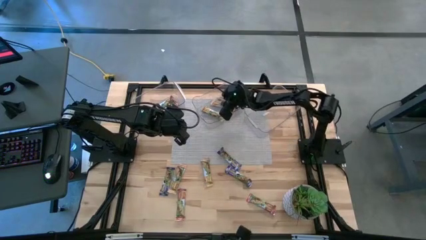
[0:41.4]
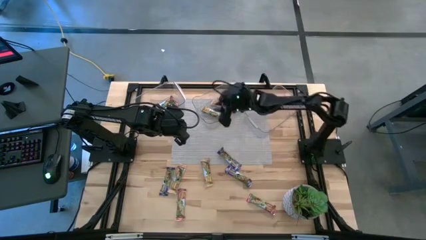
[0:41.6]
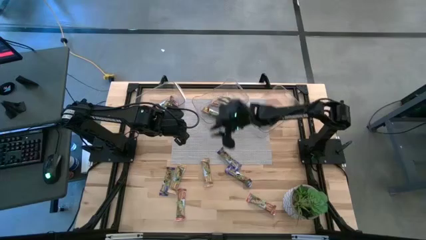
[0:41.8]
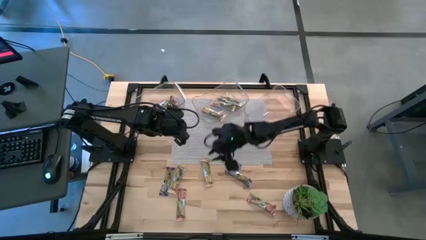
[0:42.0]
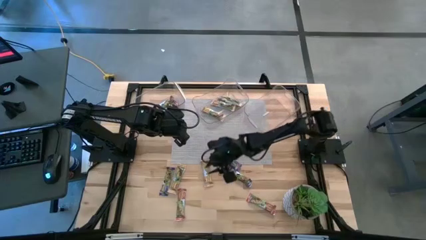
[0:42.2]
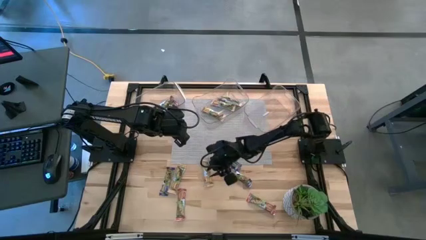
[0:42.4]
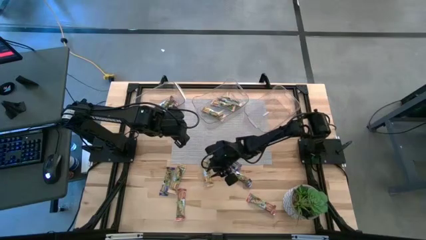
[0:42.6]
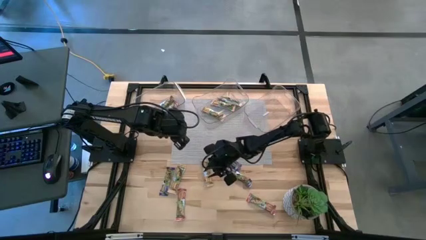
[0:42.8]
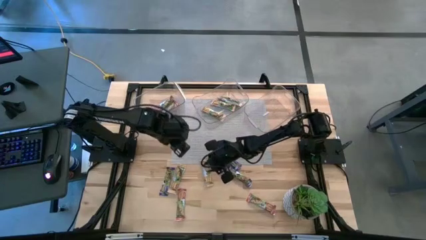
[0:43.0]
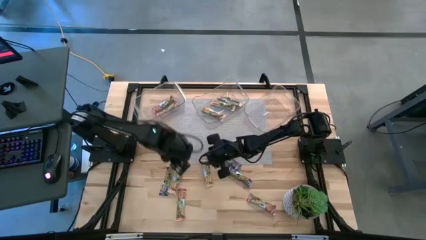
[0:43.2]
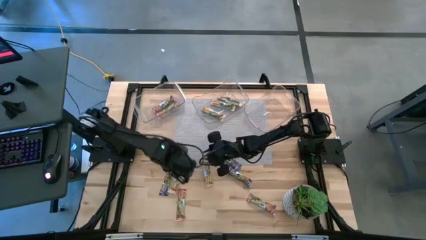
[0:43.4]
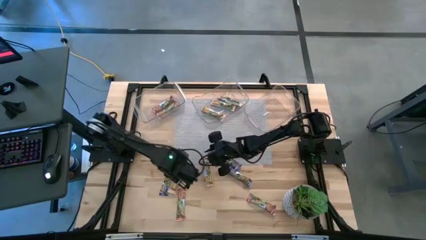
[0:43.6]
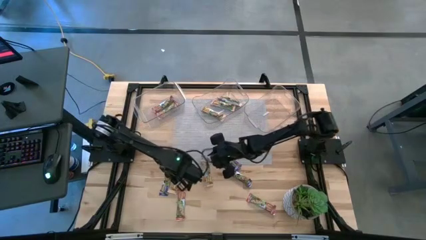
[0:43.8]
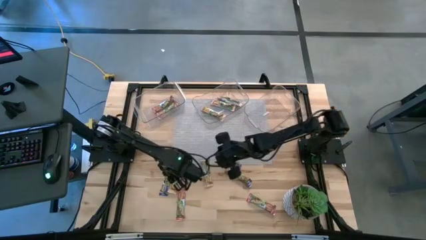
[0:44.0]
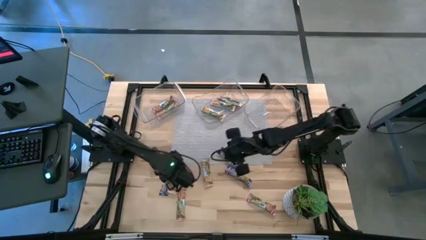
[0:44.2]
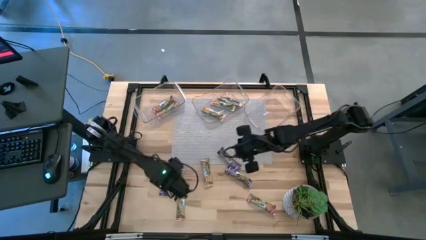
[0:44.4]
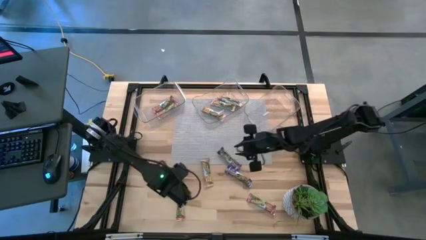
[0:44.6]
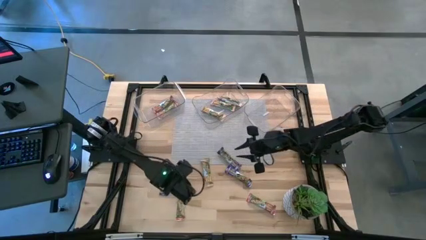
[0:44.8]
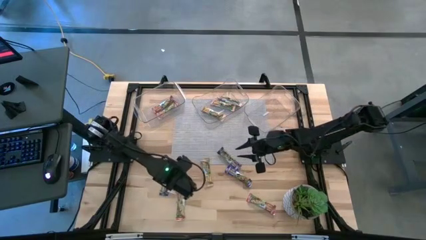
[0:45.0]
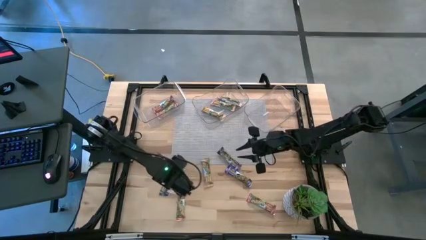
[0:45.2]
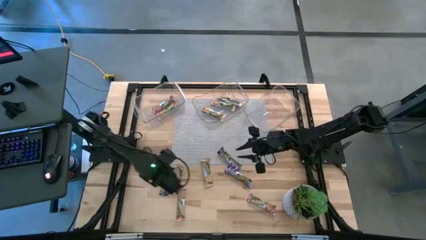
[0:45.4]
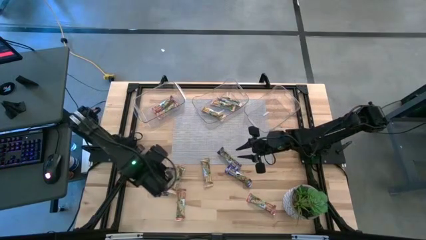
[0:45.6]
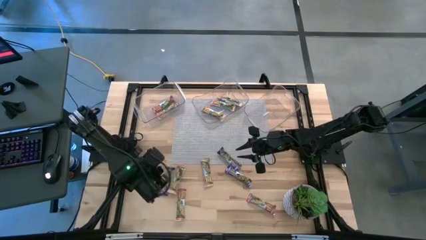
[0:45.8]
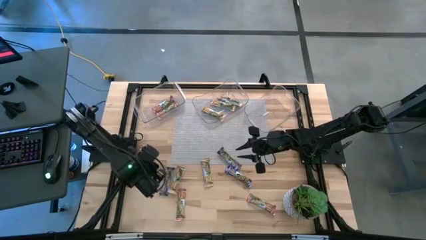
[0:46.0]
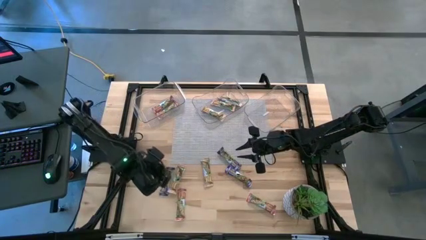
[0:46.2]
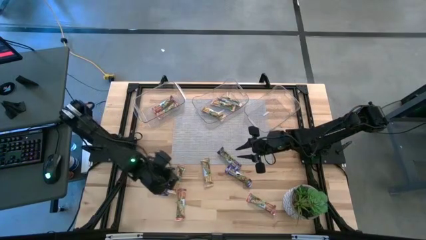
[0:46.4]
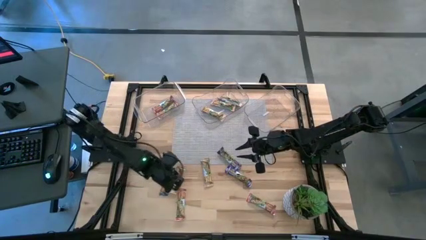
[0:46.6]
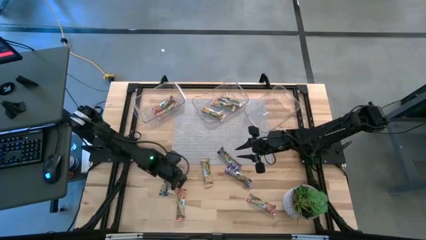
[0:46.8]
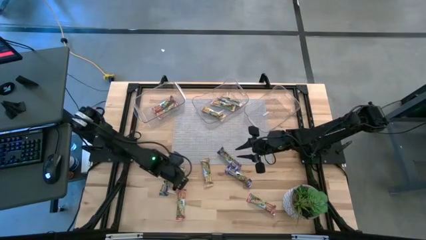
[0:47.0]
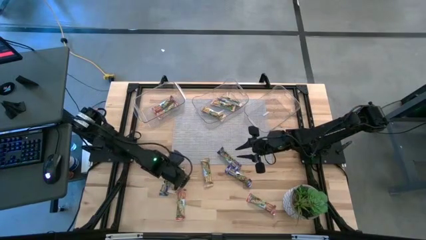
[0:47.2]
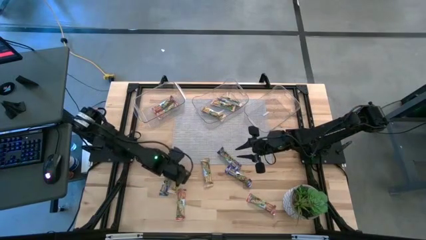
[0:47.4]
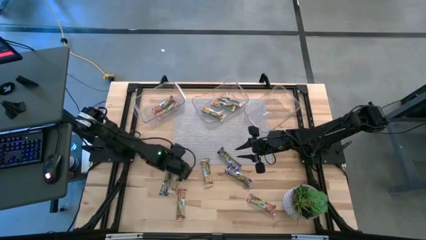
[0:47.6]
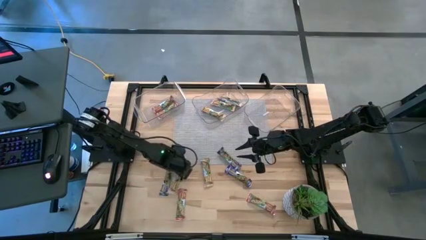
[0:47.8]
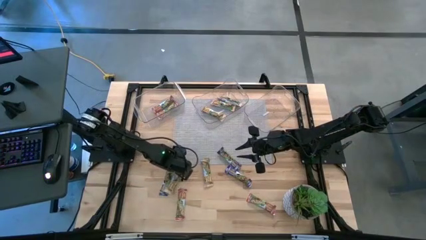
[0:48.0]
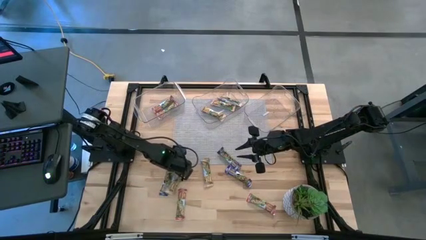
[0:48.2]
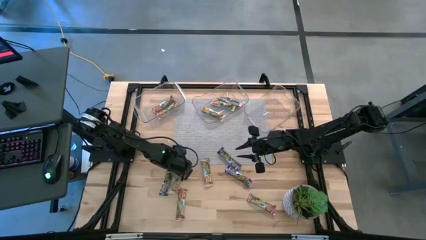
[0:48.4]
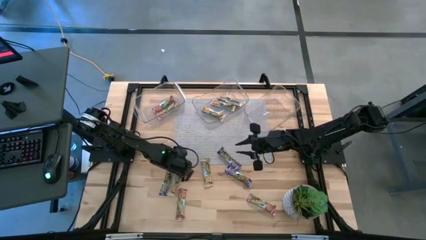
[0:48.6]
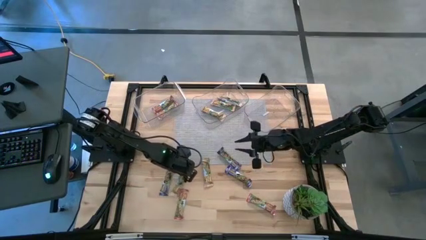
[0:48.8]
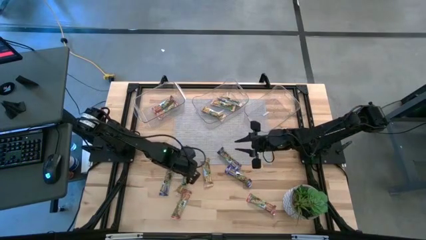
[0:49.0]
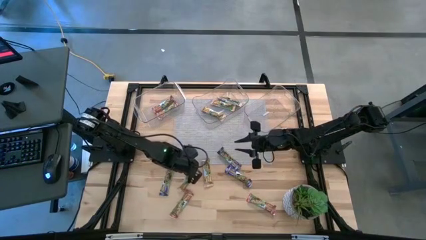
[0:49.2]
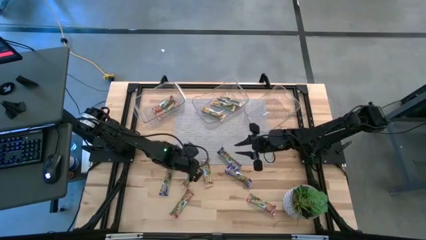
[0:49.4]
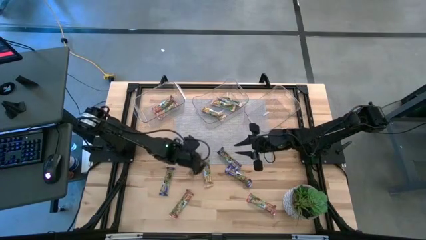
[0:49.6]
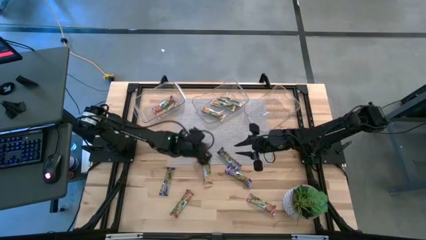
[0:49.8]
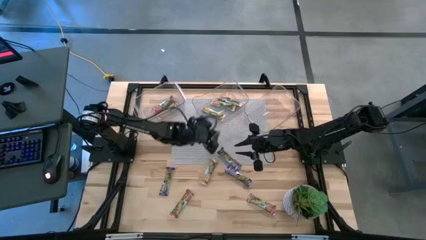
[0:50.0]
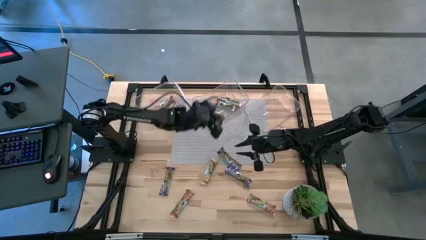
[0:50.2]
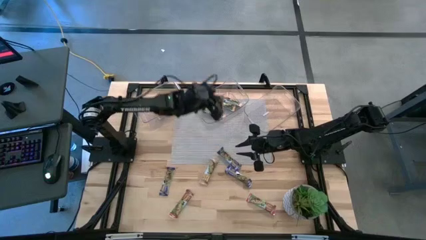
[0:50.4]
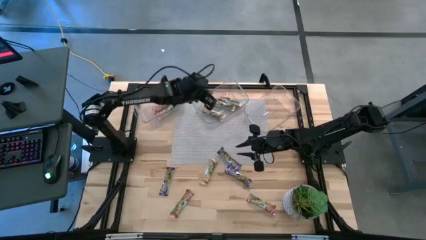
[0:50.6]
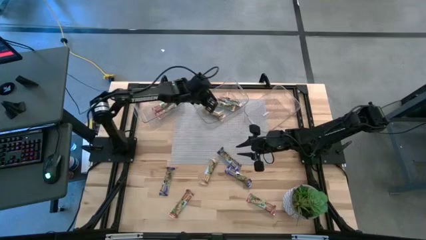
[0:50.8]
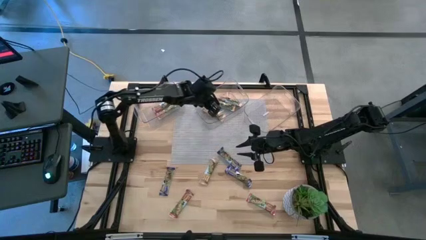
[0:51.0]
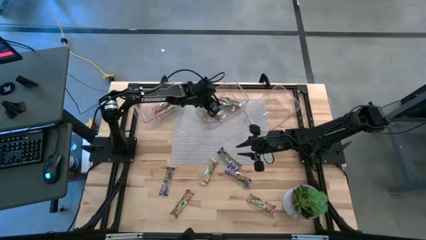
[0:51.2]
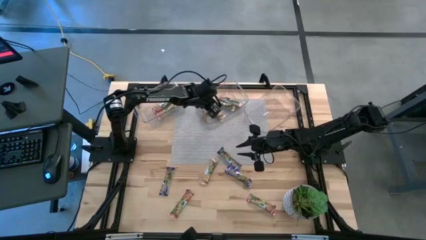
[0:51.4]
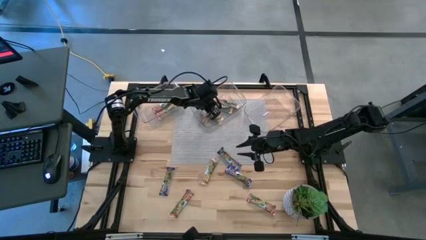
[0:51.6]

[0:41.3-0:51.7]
Task: Pick and place Granola Bars by type
Put the yellow granola bar into the middle transparent bin

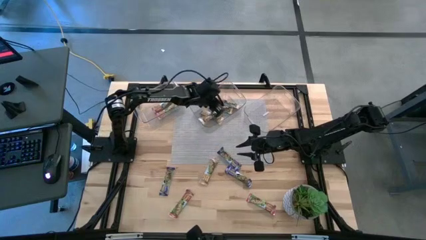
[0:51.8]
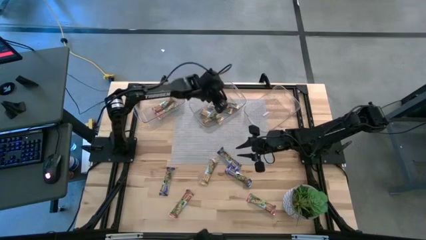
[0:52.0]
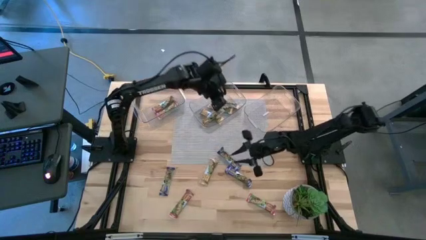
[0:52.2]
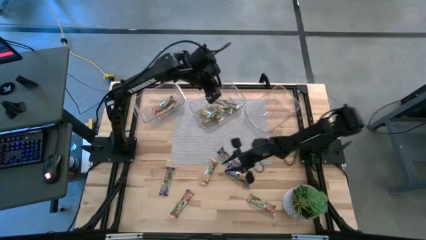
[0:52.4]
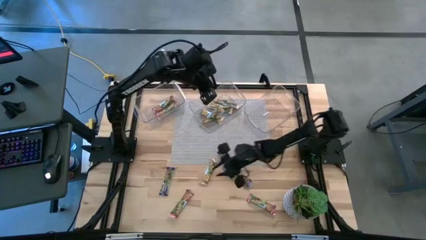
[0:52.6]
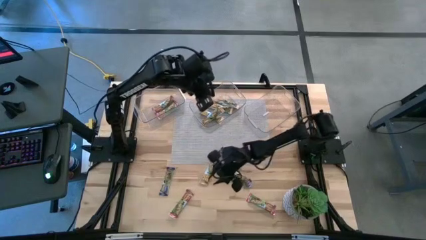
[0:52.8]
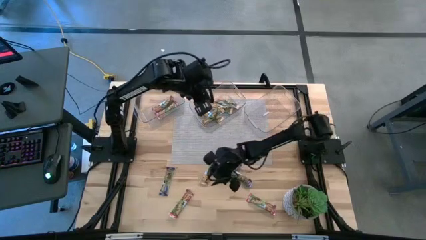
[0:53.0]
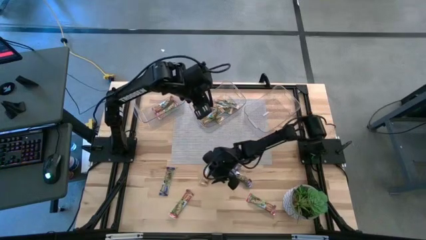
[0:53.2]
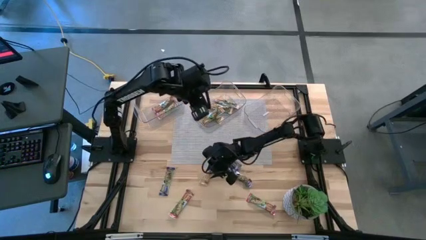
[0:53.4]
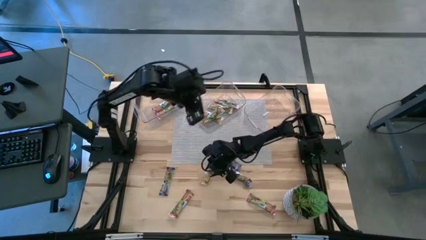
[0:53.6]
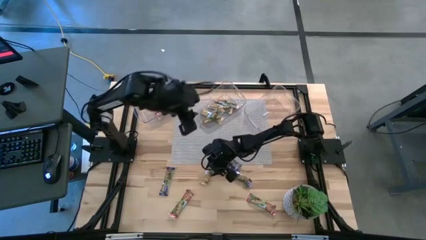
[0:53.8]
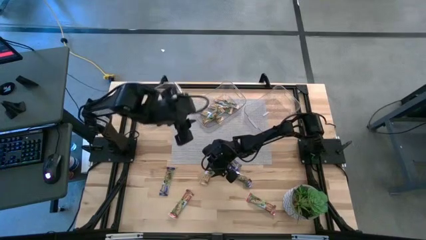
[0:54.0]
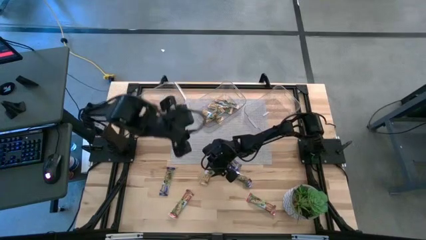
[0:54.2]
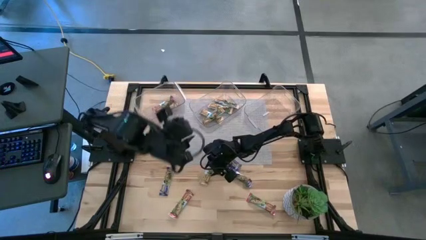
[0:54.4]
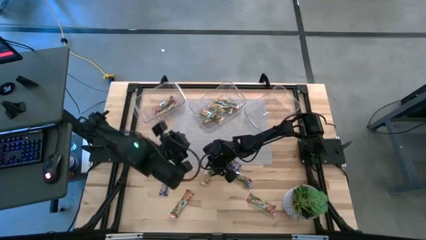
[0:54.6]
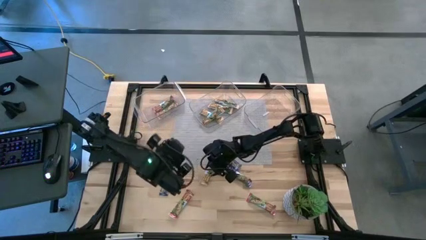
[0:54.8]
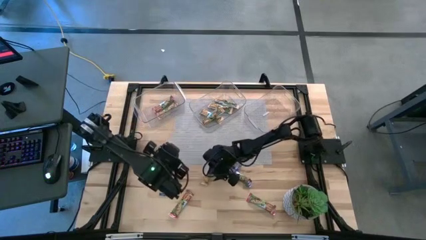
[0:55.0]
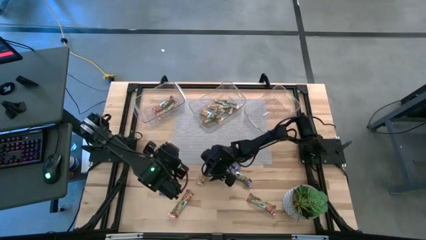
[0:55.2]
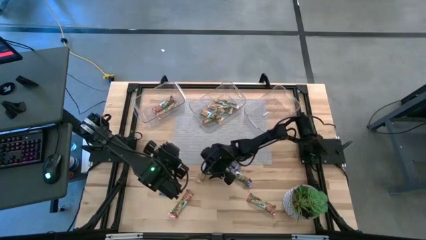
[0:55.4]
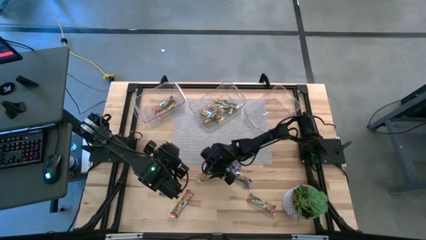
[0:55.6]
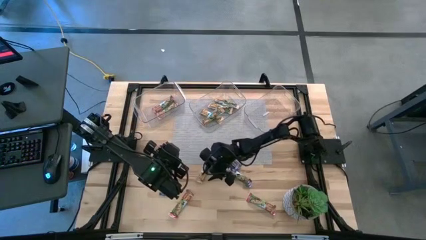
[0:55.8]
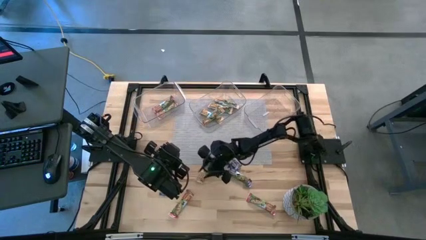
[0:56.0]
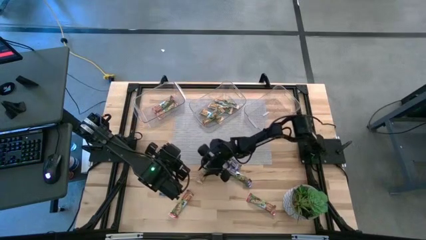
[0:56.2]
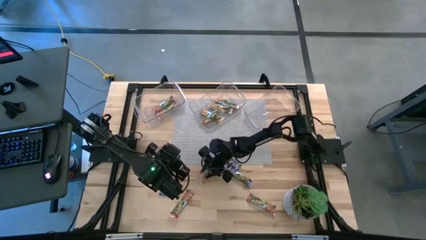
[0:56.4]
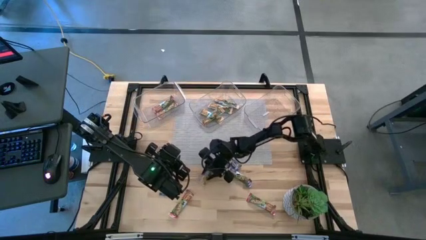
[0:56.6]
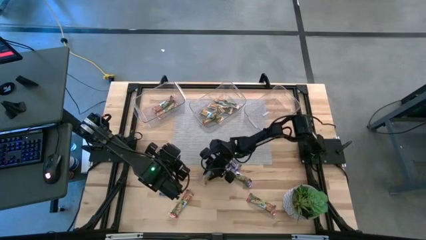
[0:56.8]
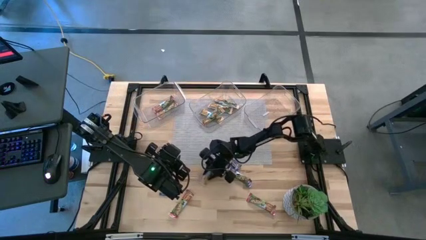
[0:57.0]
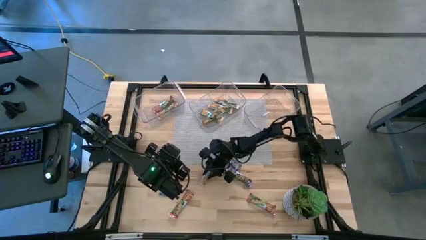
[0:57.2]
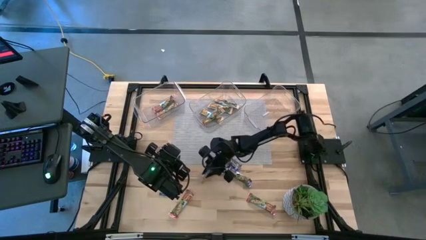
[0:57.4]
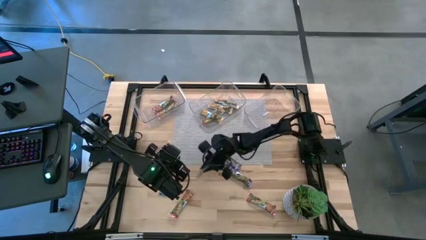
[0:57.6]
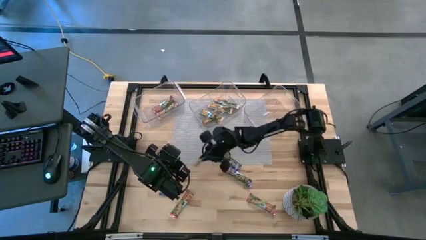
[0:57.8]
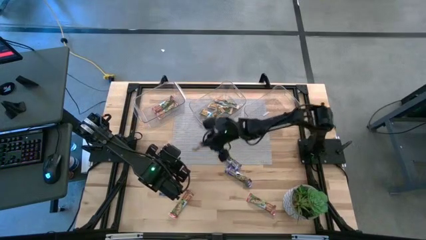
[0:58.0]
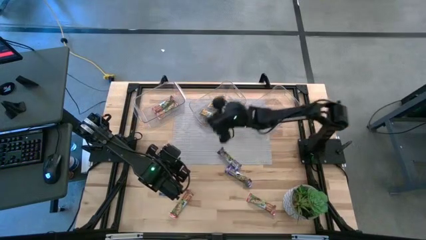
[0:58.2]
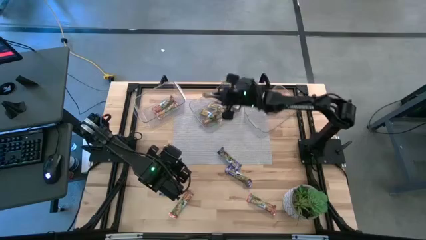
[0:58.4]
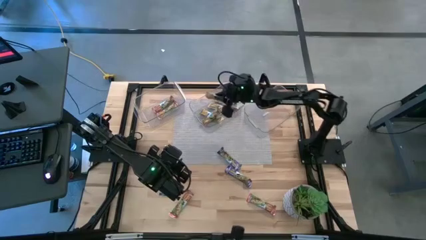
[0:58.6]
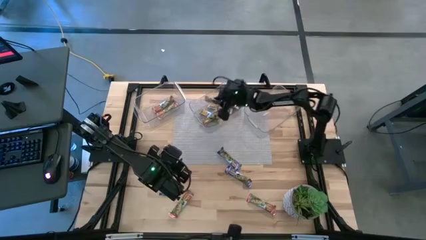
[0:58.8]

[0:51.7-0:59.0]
Put the yellow granola bar into the middle transparent bin
